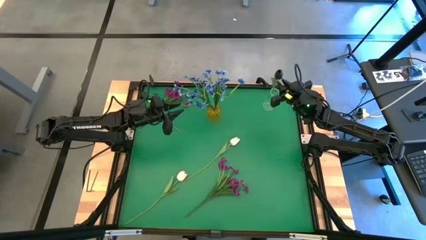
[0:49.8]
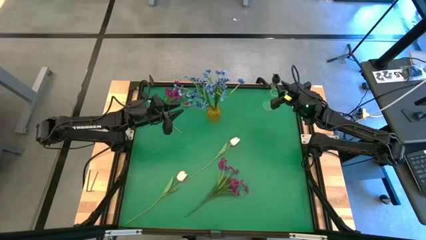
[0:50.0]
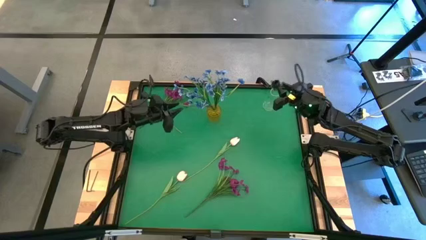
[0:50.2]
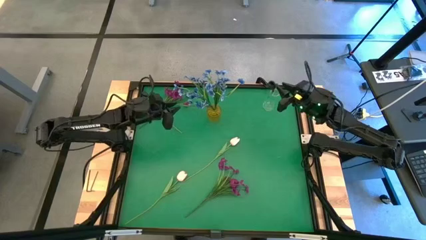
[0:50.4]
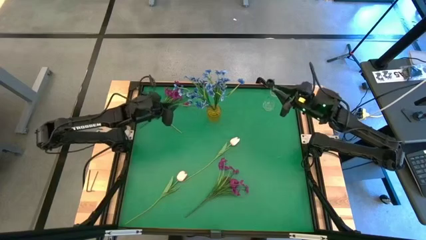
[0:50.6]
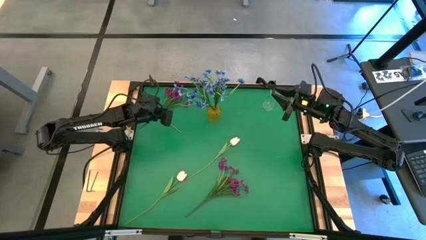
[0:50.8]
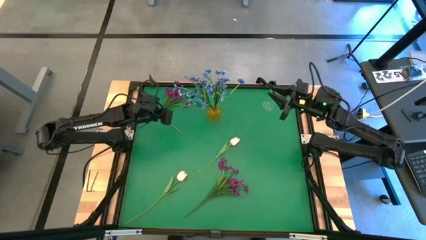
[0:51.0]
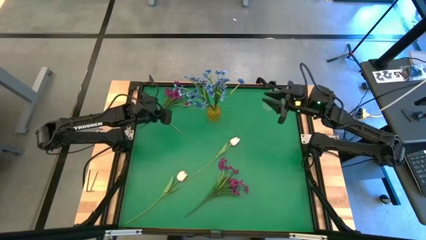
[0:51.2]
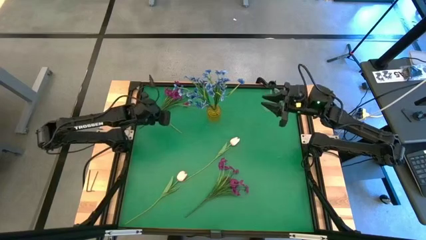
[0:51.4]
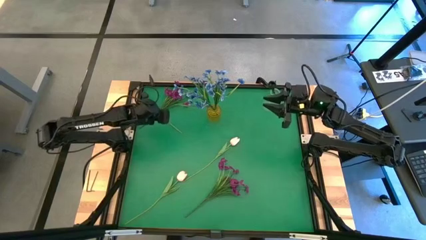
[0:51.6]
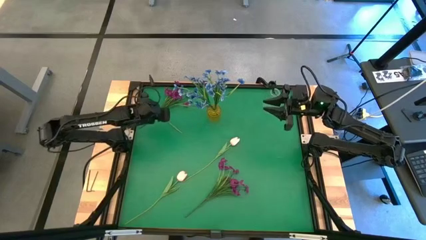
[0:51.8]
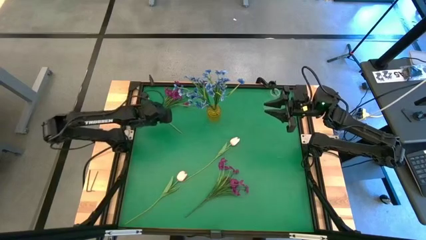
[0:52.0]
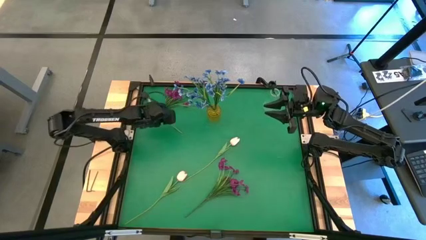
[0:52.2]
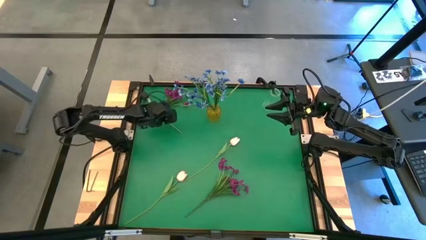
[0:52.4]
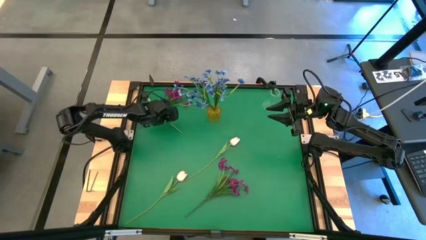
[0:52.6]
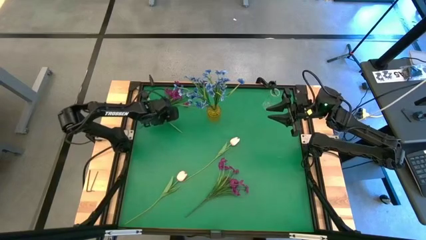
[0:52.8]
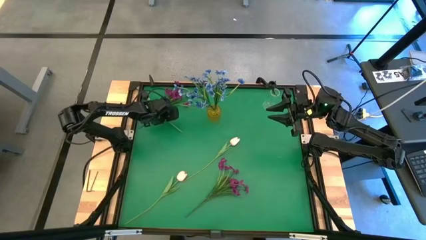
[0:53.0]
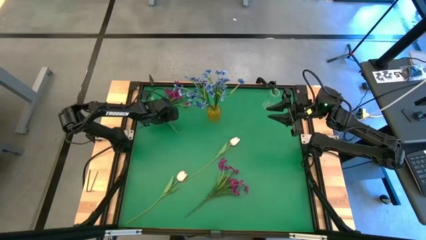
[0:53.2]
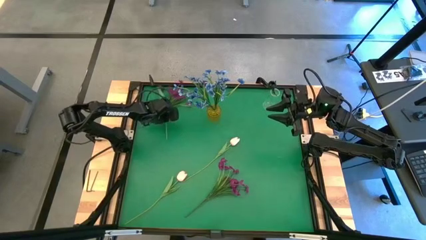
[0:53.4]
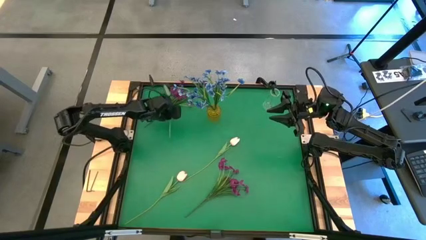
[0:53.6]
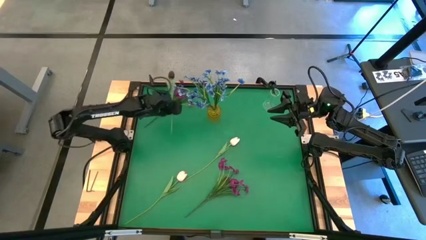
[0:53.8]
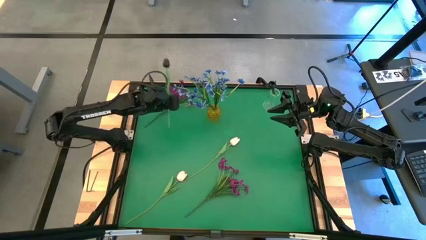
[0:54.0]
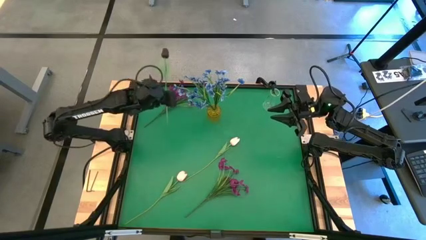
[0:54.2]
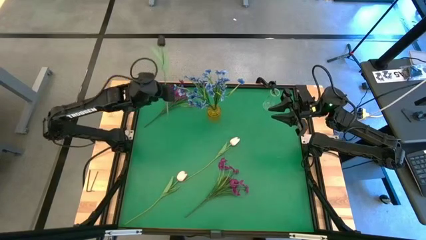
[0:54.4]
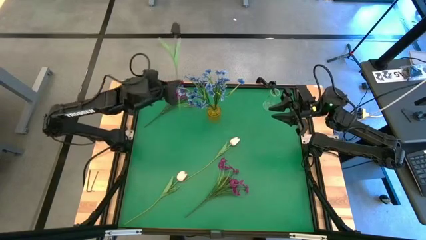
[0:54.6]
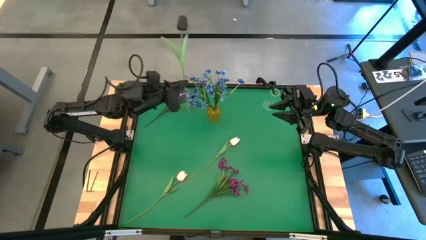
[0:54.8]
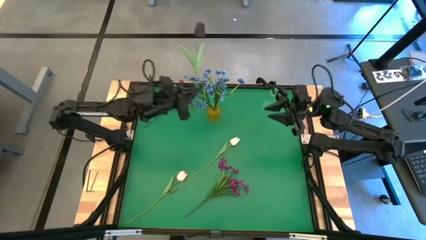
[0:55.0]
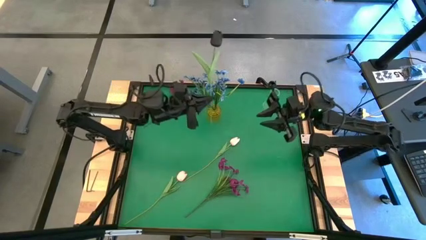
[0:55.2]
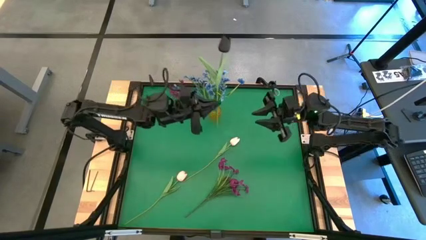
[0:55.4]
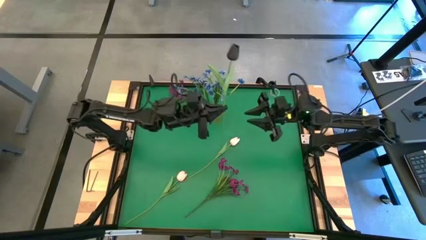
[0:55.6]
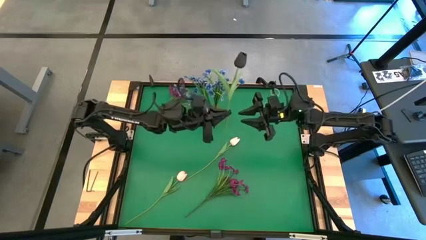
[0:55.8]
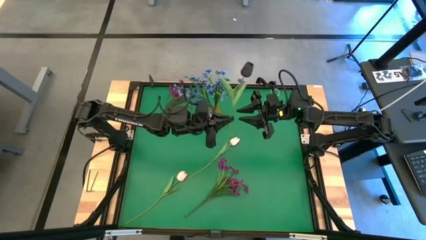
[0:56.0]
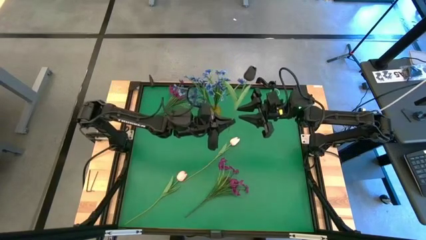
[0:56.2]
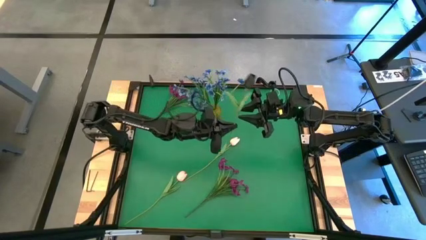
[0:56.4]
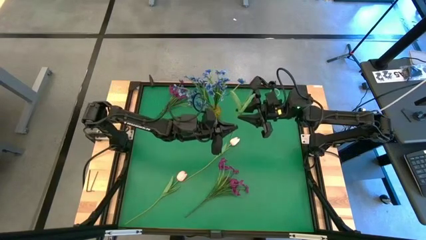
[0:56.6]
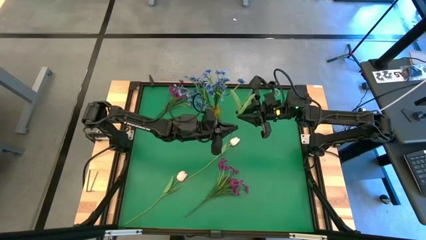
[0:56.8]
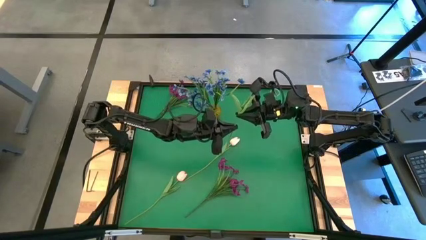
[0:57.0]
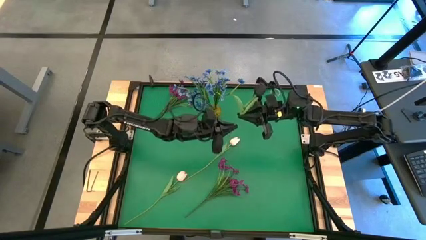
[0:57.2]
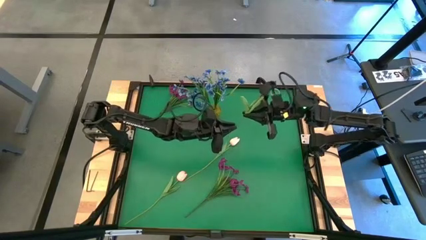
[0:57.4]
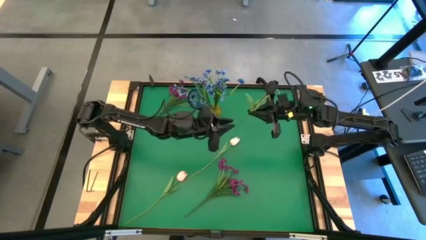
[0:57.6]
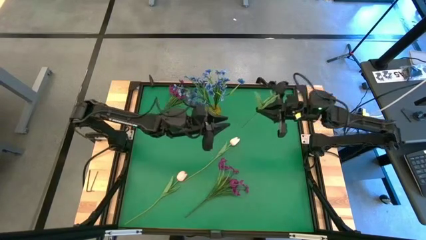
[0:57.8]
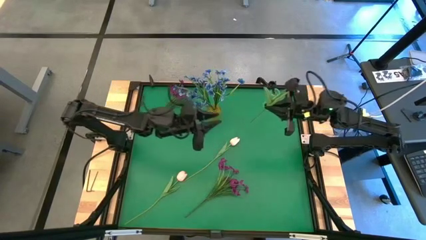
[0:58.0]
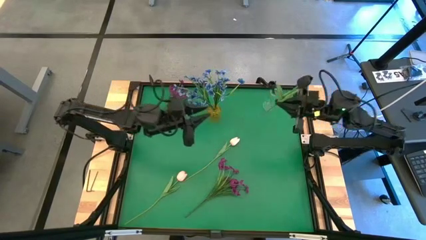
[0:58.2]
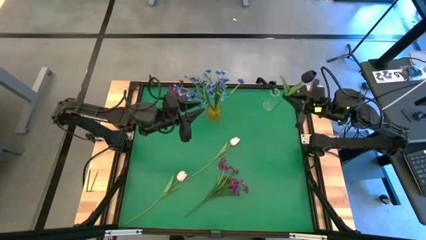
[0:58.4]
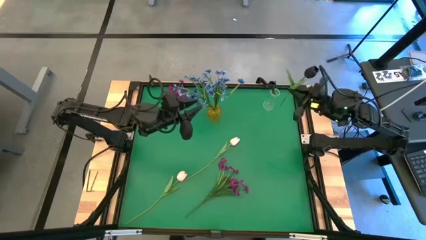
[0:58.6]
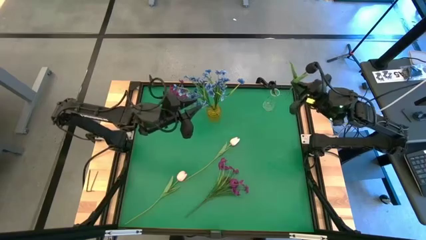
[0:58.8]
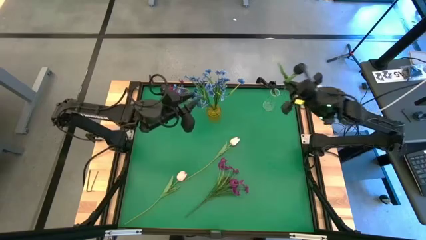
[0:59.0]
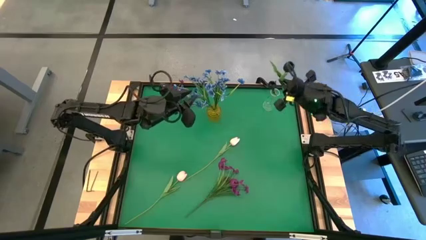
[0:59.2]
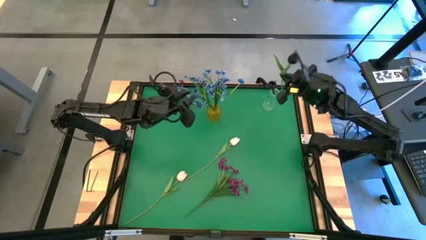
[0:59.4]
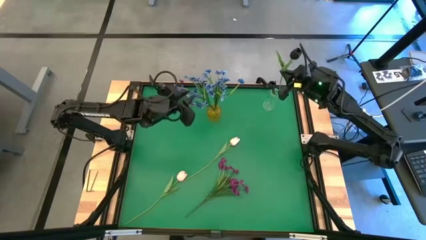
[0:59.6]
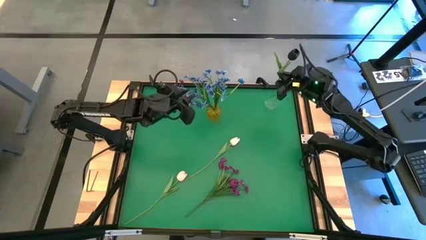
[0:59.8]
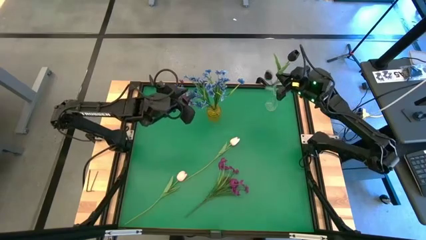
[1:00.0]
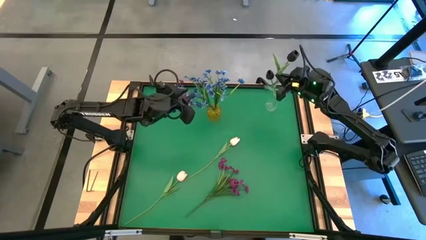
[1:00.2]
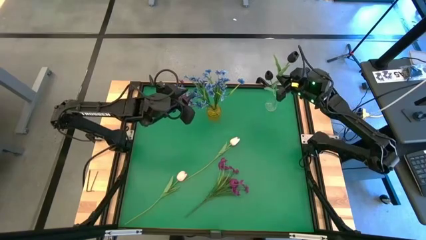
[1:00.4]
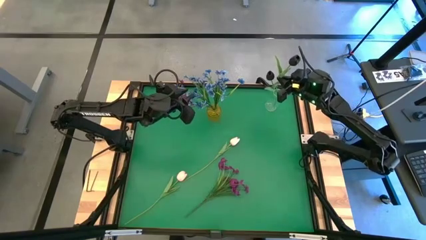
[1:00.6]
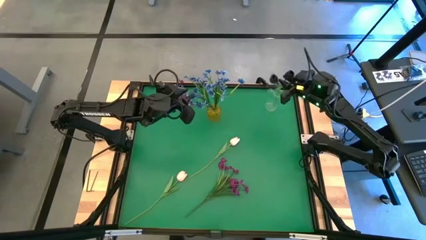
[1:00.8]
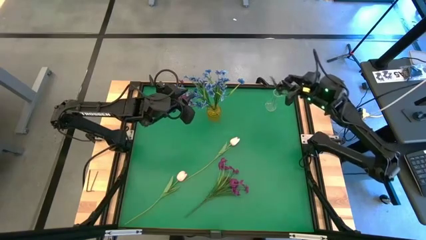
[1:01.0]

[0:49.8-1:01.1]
Task: Sort flowers into vase by color
Put the black flower into the transparent vase
